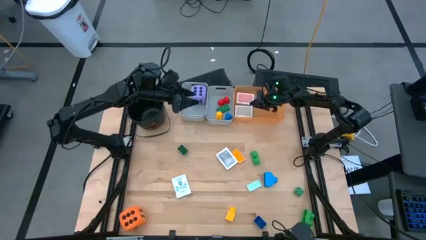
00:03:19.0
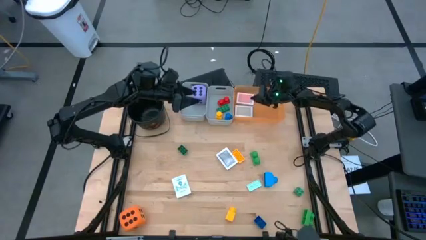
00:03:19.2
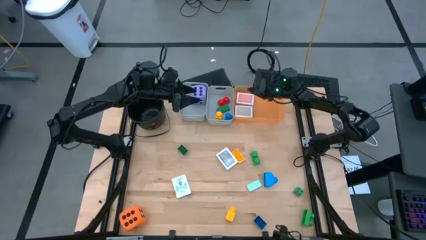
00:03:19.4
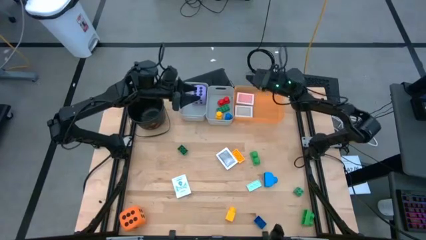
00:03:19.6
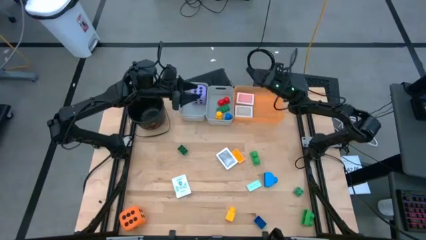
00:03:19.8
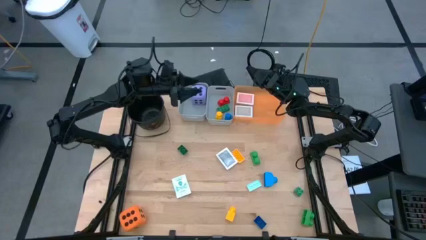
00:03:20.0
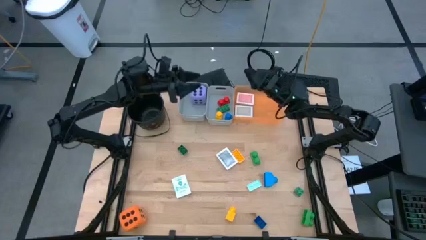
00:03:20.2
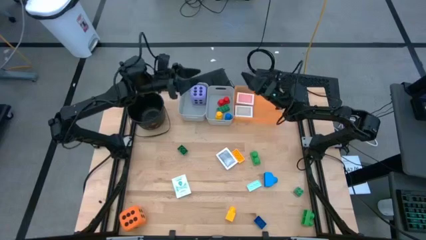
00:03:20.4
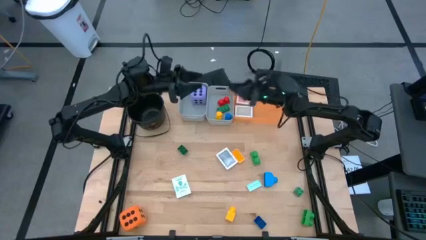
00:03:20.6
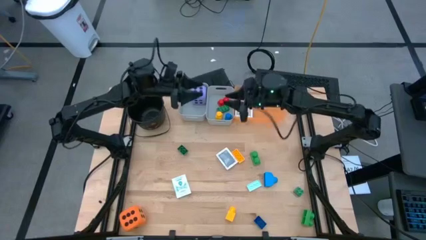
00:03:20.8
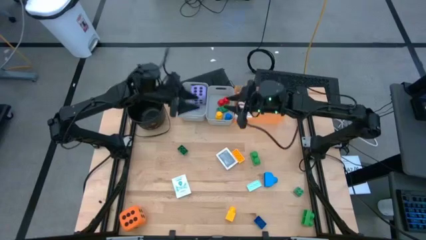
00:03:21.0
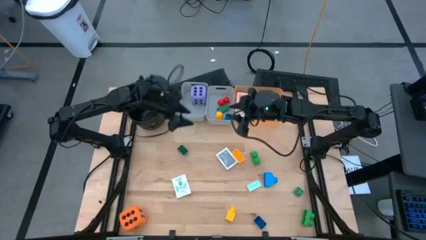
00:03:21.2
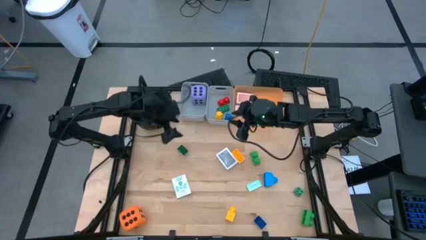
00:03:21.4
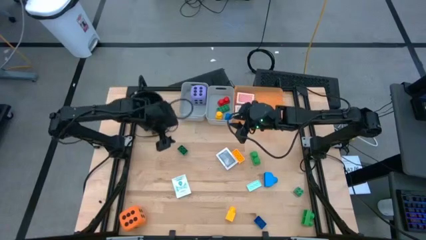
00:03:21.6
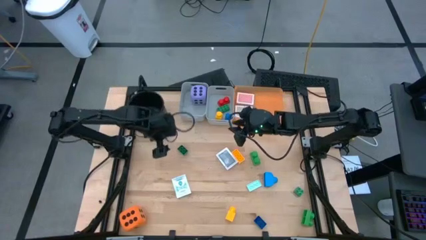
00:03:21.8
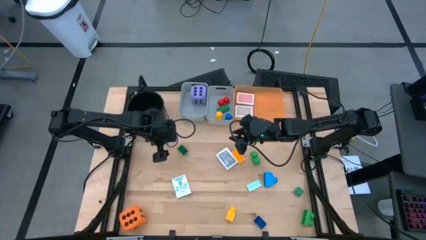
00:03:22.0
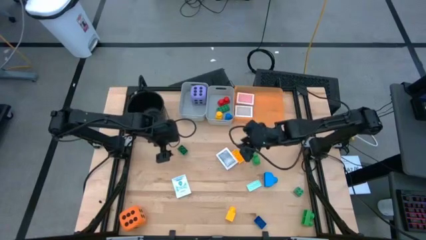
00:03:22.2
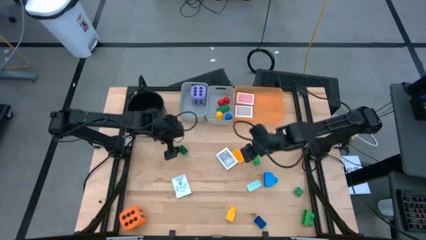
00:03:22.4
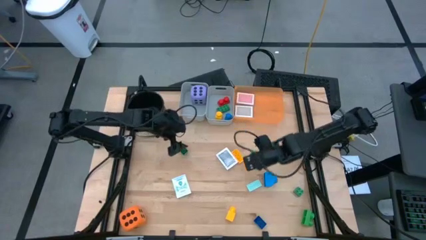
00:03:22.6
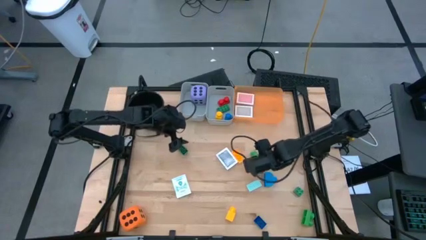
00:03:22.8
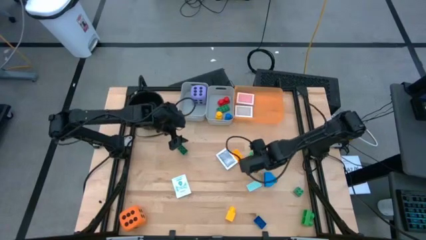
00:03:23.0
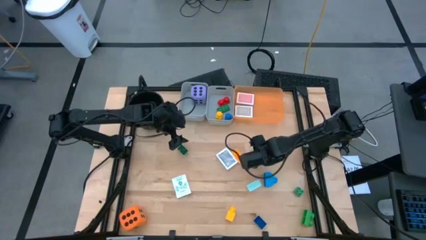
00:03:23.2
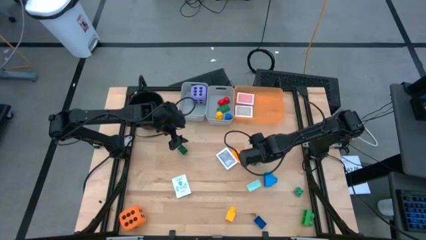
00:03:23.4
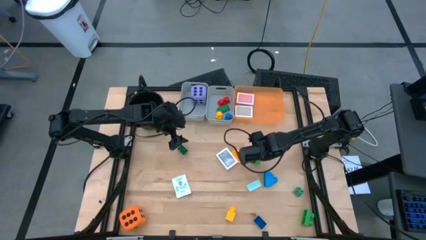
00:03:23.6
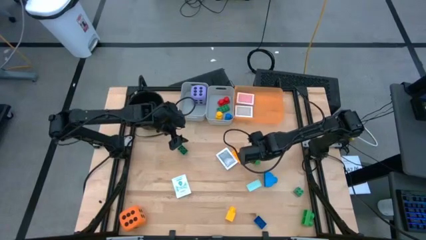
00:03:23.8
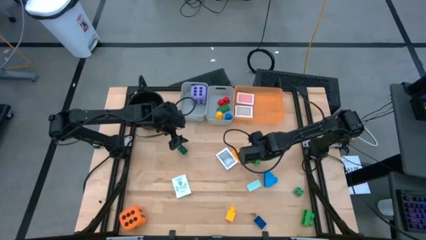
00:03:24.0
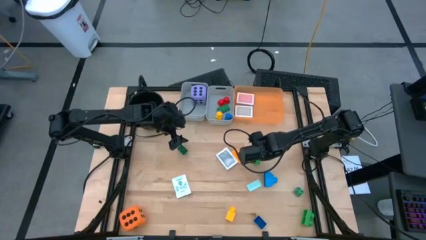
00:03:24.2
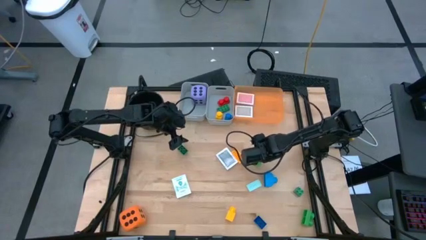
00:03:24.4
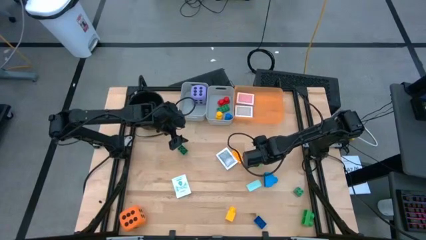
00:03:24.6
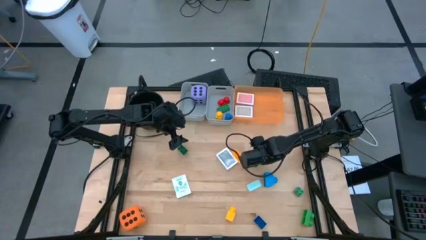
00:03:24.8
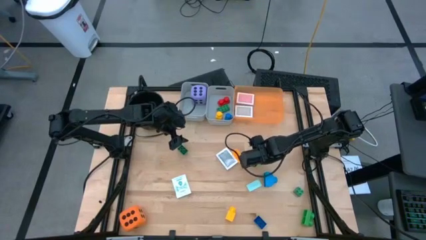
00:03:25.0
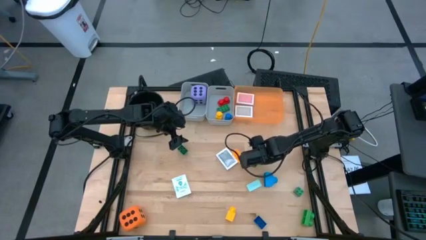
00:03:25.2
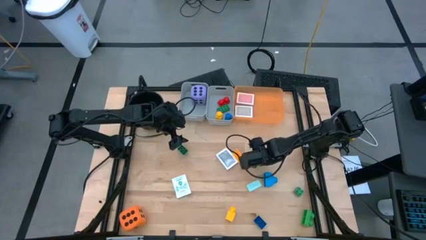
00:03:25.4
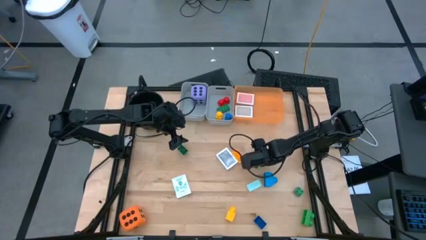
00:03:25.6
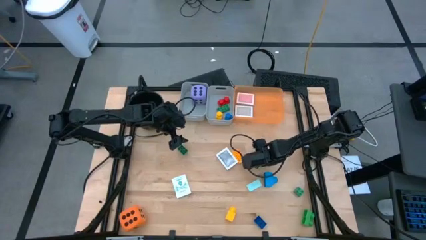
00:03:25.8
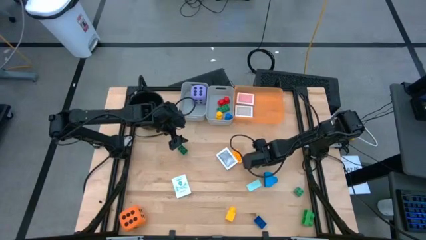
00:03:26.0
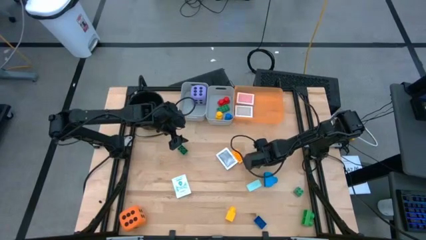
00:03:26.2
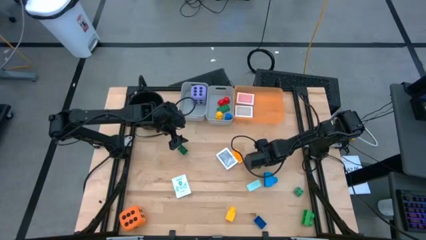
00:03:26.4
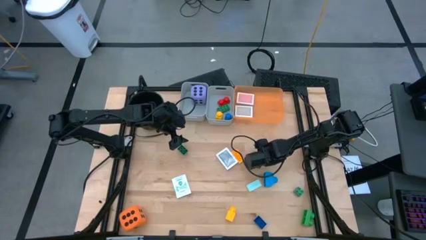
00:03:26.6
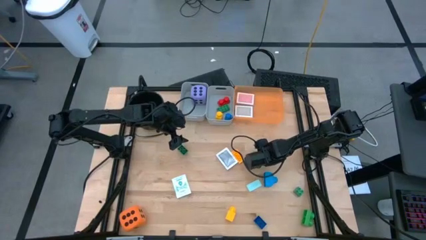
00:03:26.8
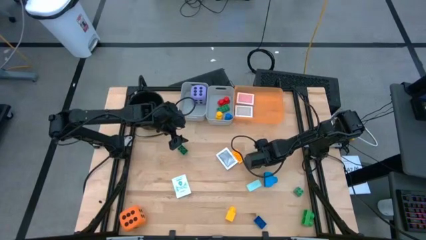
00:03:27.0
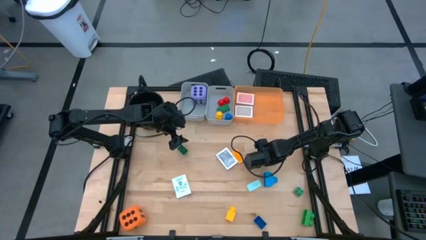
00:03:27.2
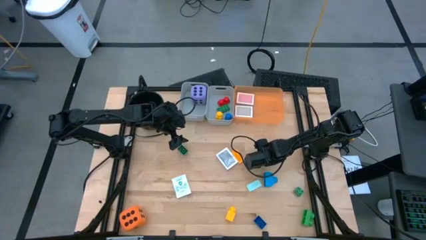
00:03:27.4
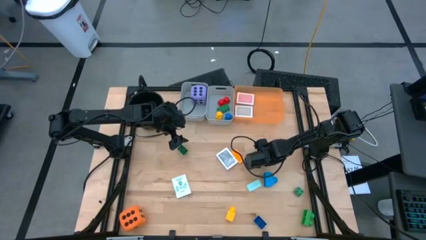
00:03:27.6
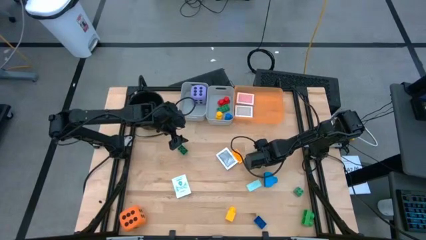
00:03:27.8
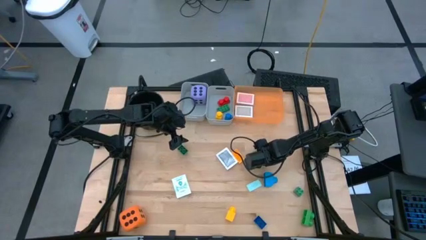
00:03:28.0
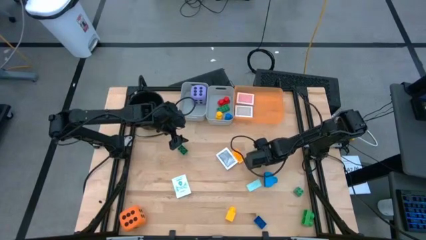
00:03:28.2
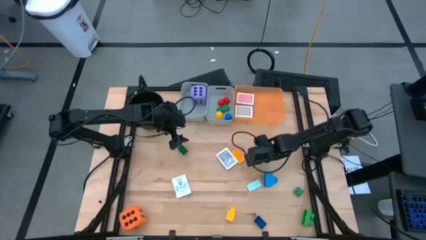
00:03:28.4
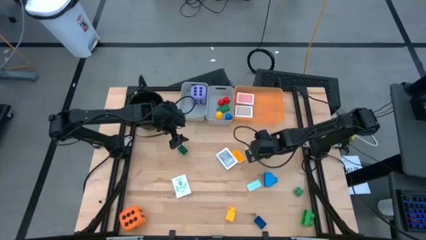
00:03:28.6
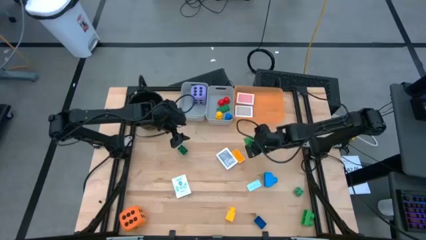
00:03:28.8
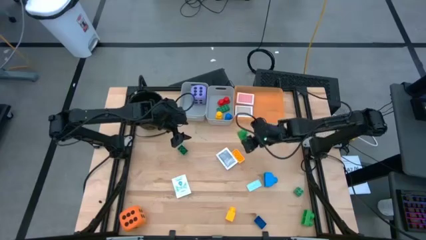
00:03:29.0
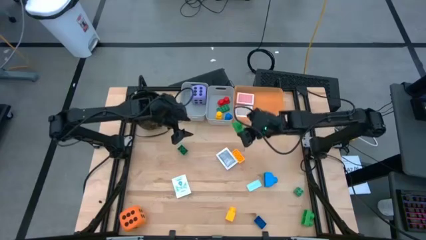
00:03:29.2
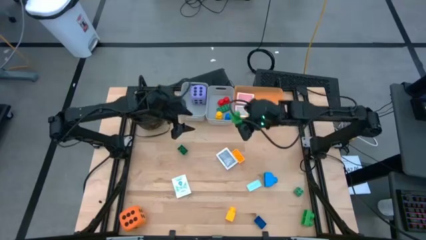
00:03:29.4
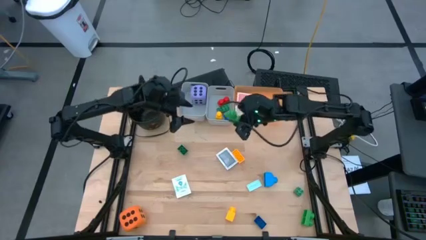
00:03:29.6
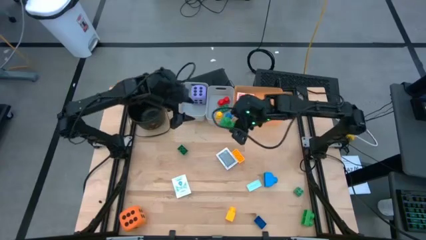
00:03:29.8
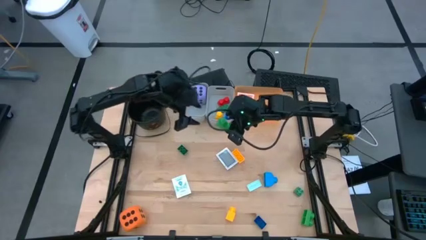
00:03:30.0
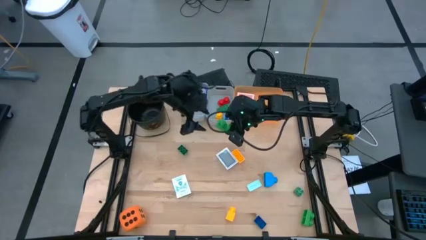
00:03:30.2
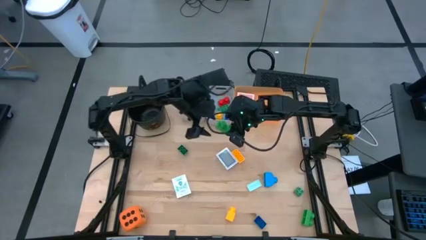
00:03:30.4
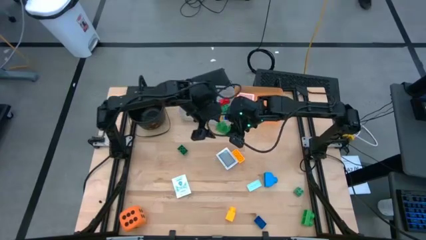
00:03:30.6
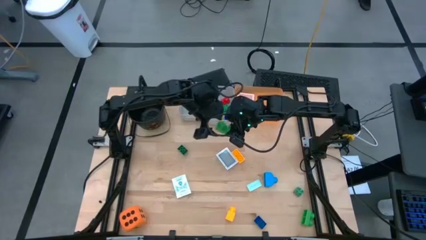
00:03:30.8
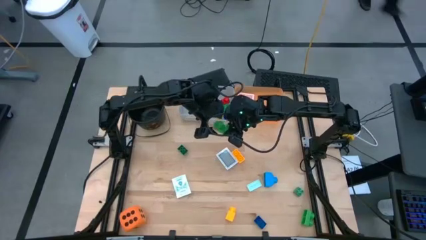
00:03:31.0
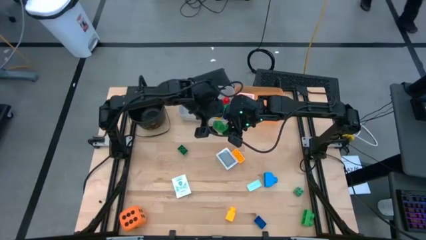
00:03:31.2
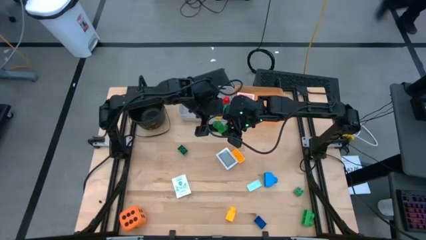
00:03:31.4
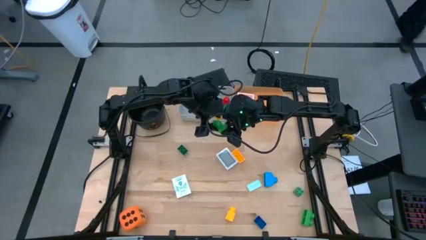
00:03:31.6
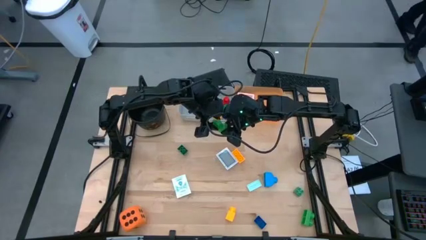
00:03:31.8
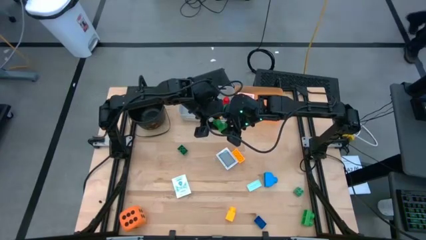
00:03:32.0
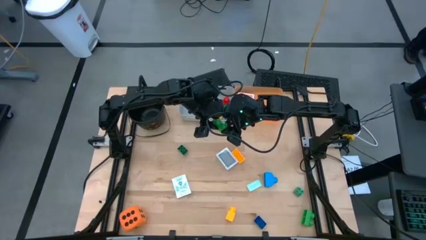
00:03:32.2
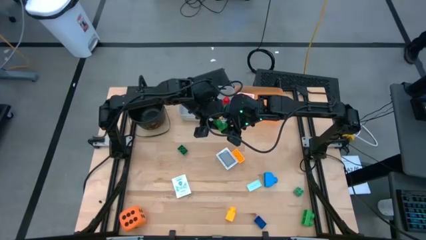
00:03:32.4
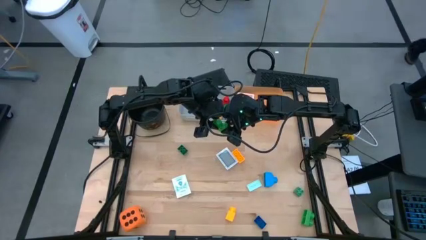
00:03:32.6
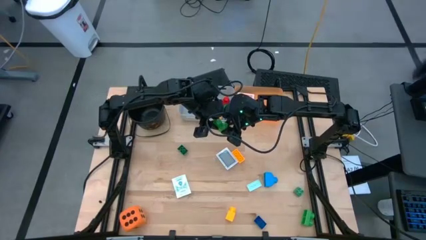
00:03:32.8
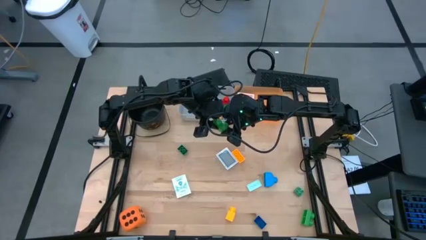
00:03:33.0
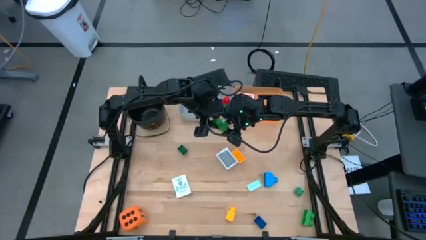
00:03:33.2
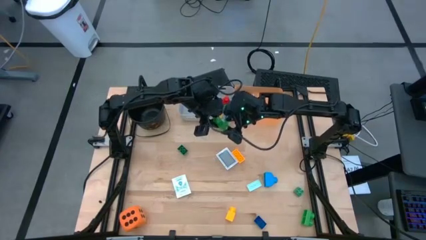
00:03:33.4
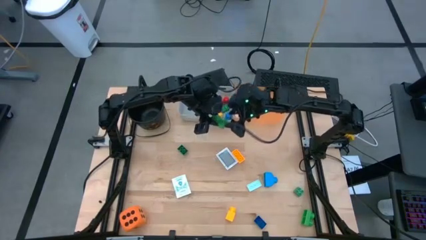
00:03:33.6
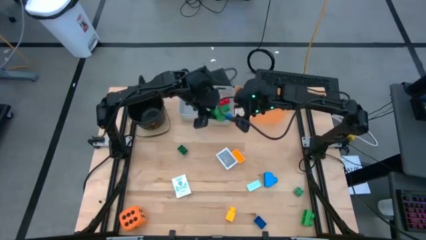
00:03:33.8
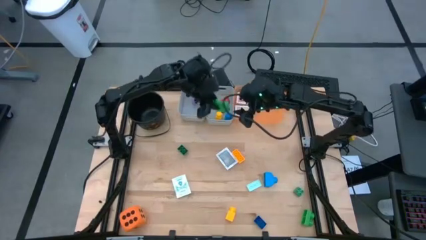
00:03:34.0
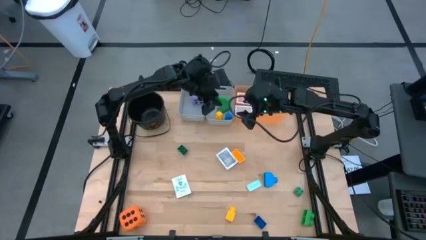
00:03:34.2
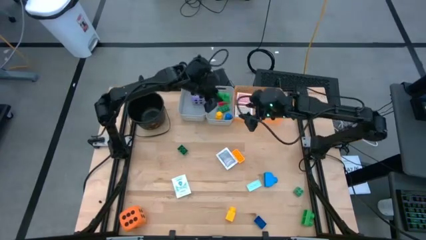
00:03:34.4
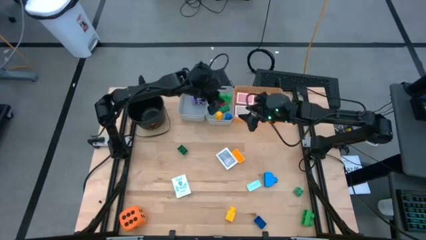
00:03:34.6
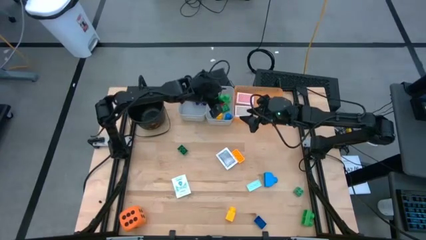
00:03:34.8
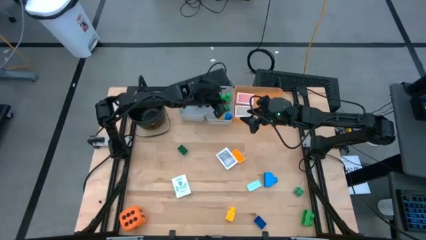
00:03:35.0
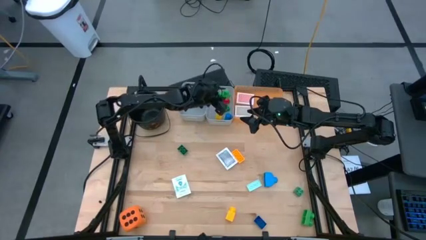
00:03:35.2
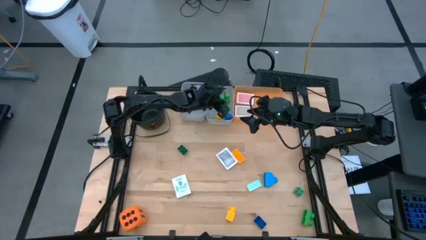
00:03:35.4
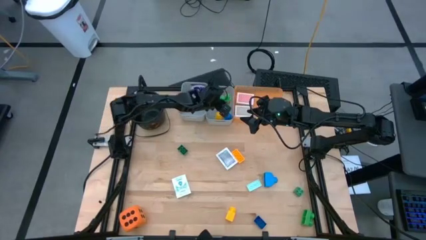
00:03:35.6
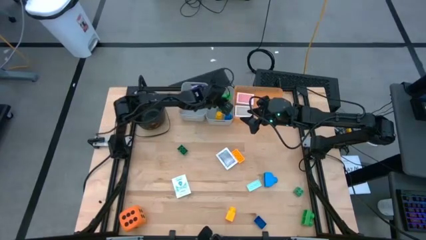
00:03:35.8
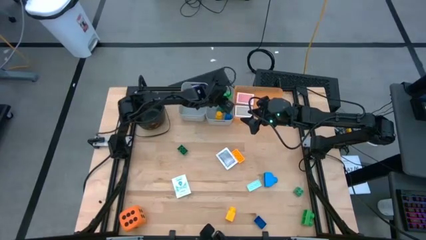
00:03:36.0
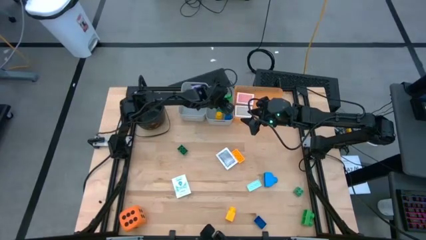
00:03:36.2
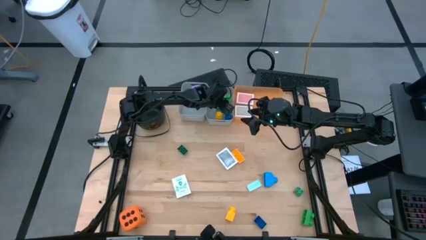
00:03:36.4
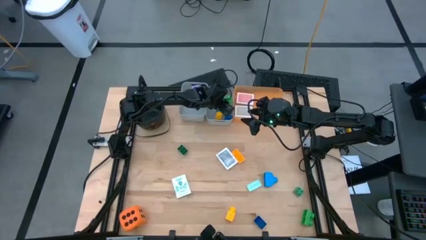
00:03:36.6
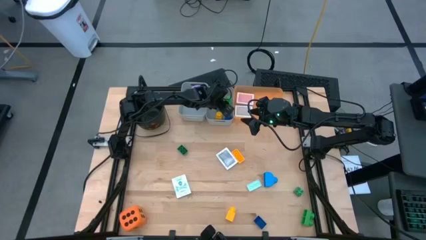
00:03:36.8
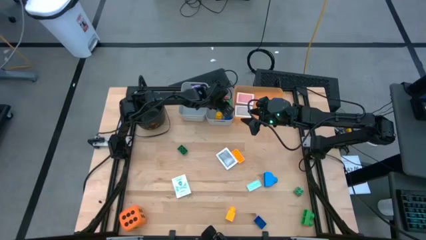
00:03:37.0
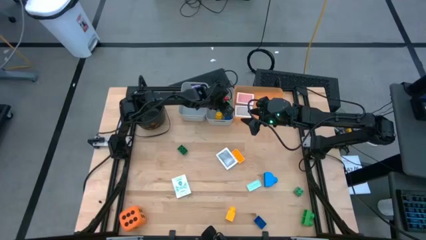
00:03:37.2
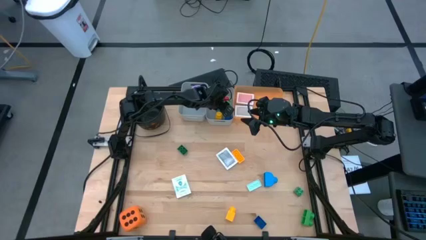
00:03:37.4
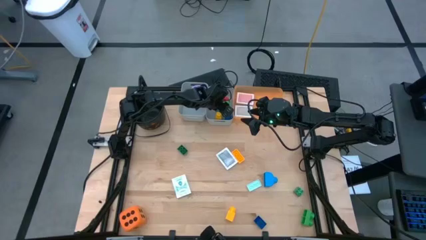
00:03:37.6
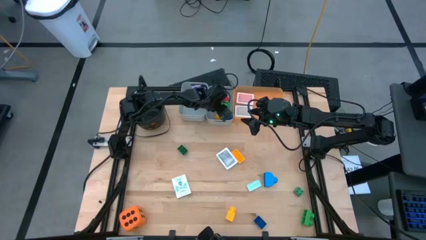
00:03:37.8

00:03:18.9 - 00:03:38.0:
Task: Pick & Place Toys
Put the green gamepiece into the right gray bin
